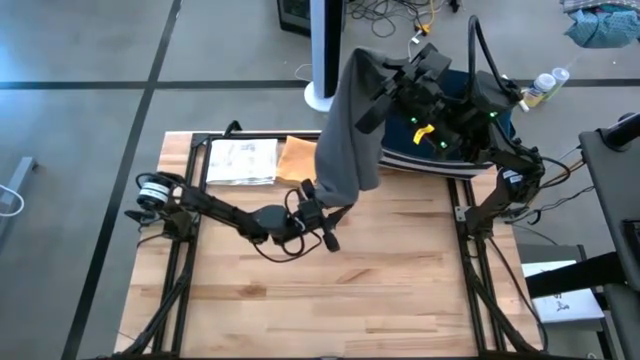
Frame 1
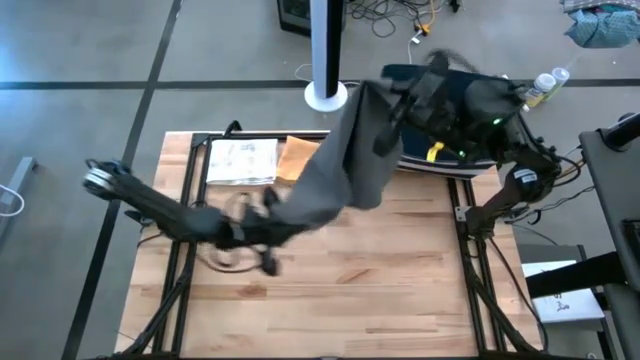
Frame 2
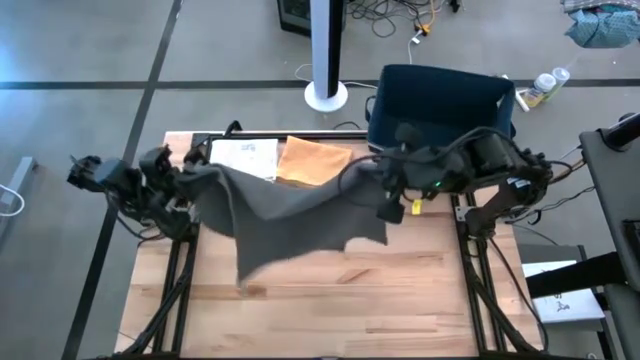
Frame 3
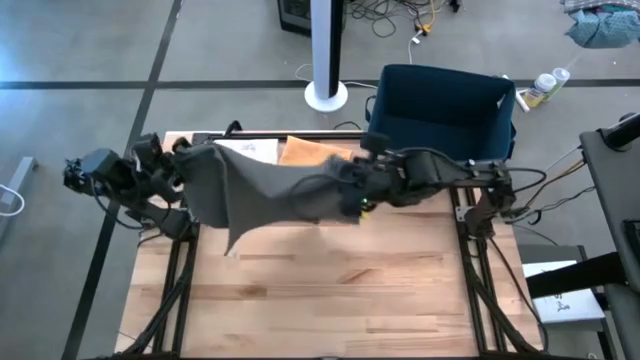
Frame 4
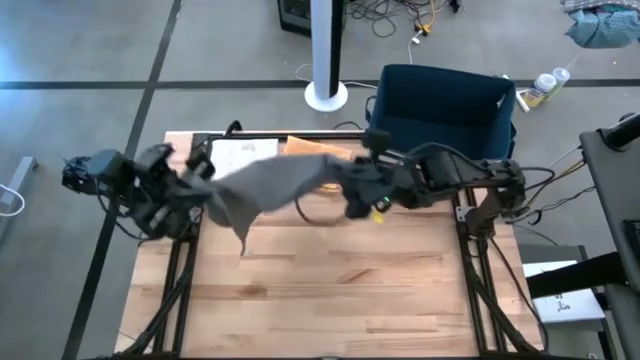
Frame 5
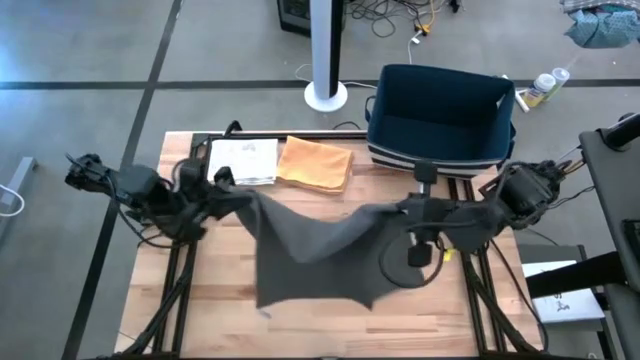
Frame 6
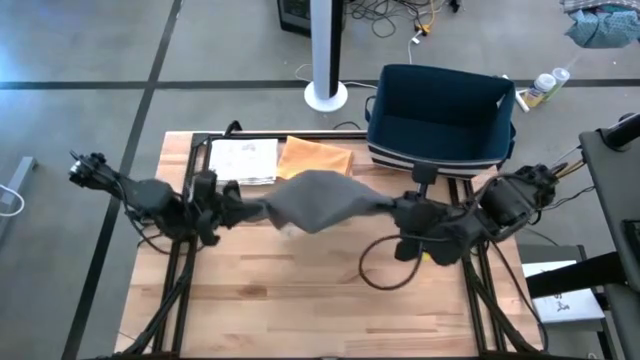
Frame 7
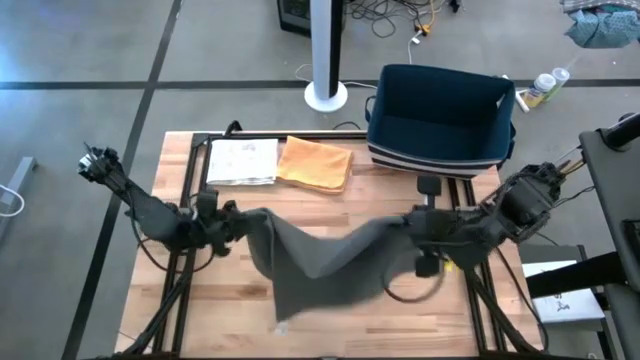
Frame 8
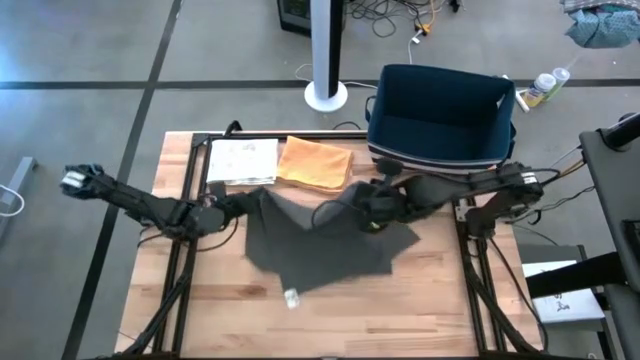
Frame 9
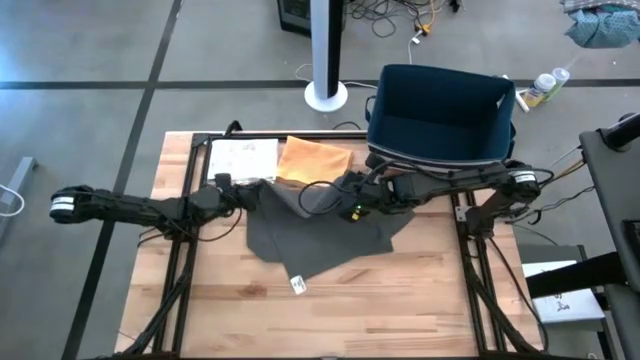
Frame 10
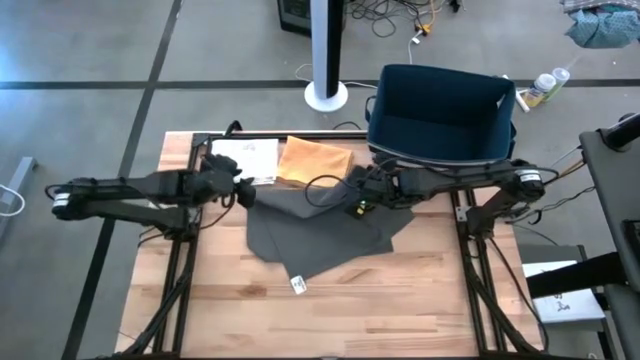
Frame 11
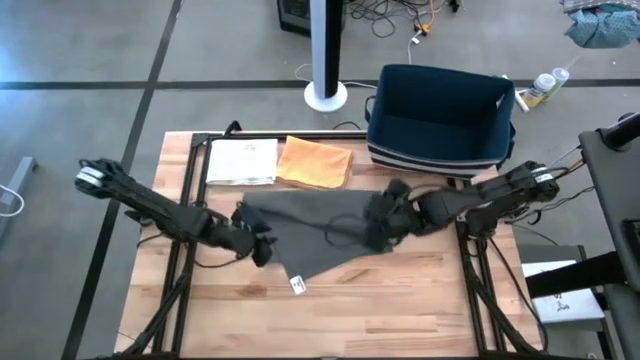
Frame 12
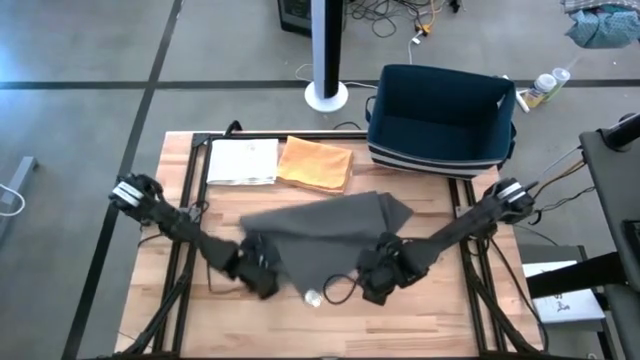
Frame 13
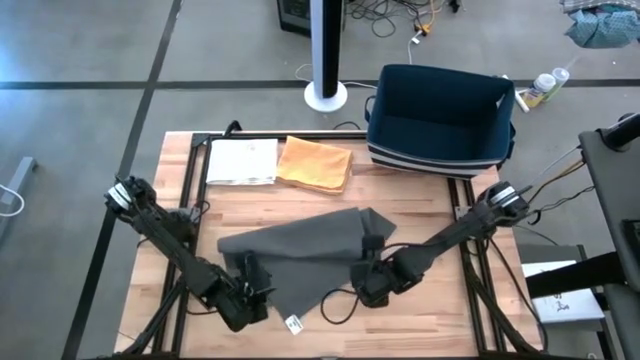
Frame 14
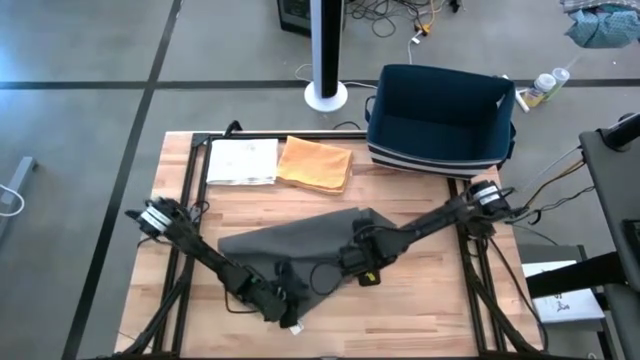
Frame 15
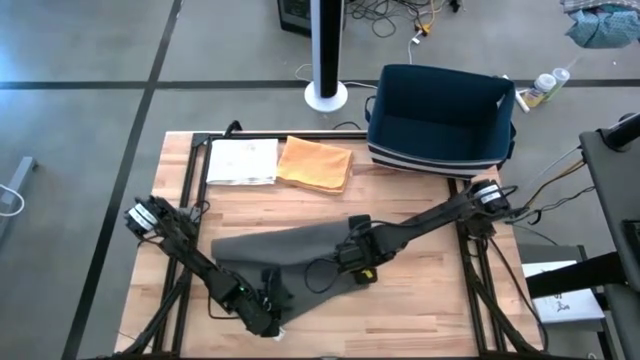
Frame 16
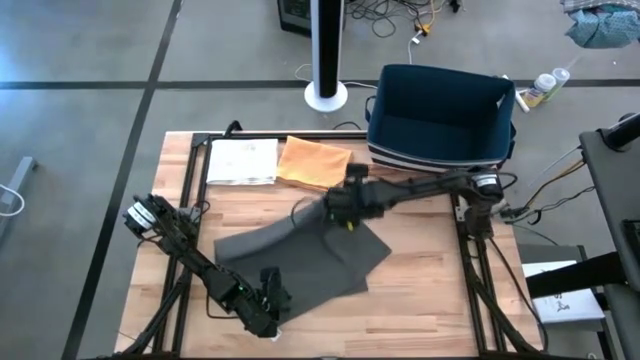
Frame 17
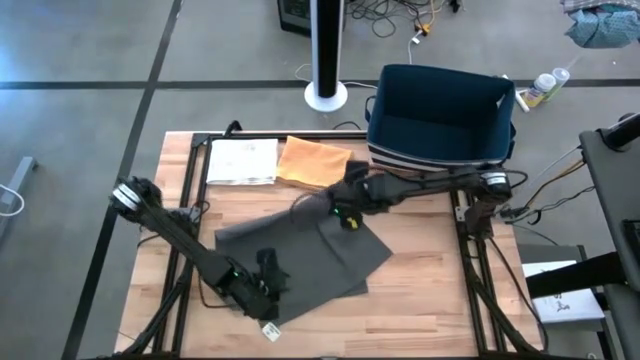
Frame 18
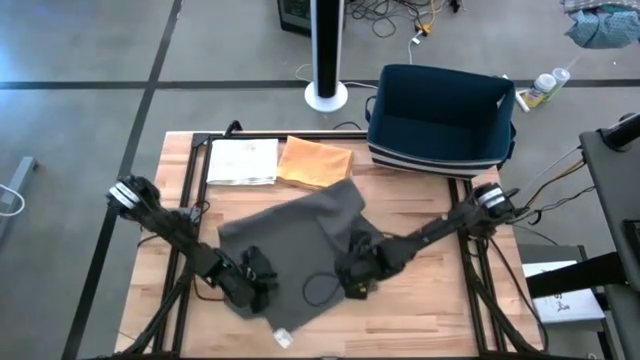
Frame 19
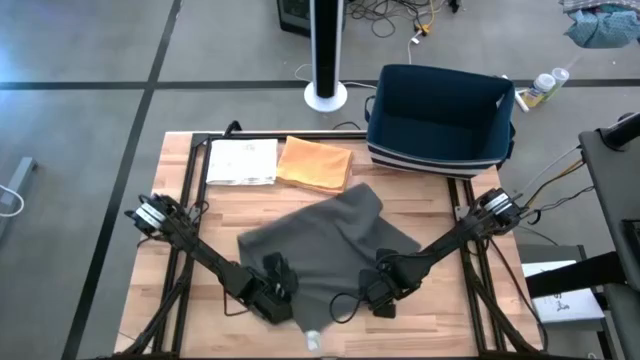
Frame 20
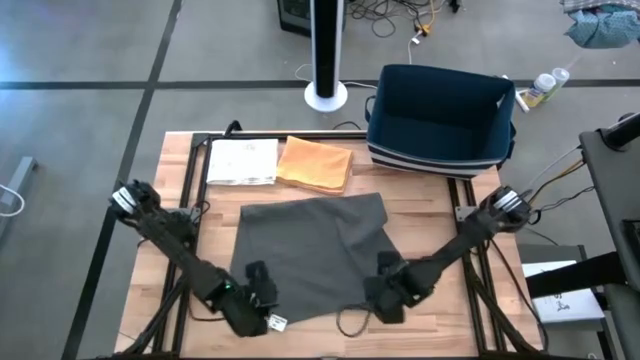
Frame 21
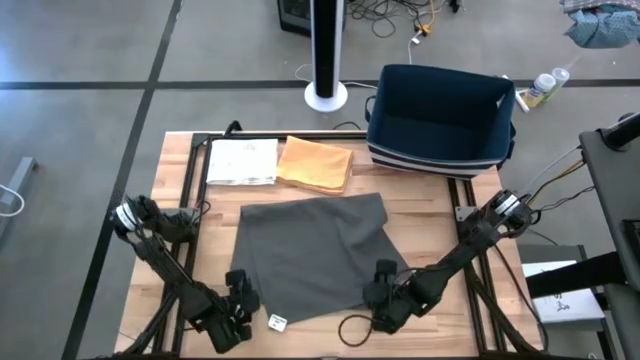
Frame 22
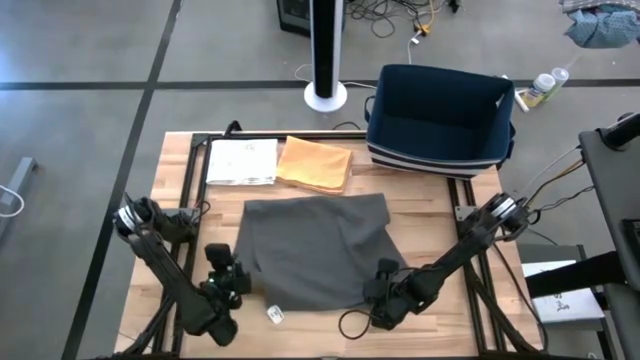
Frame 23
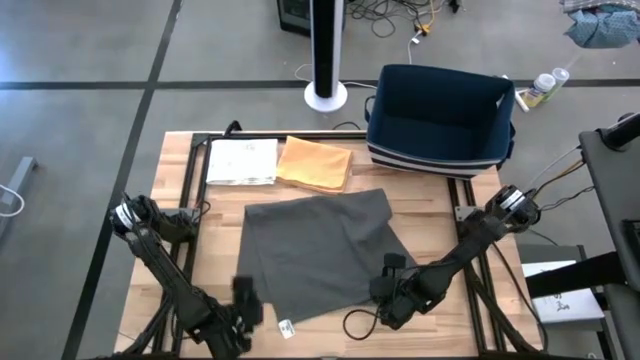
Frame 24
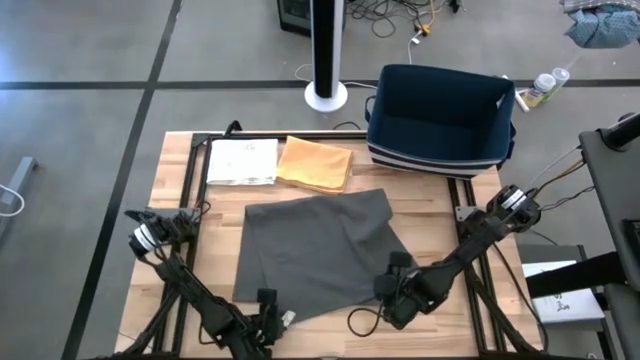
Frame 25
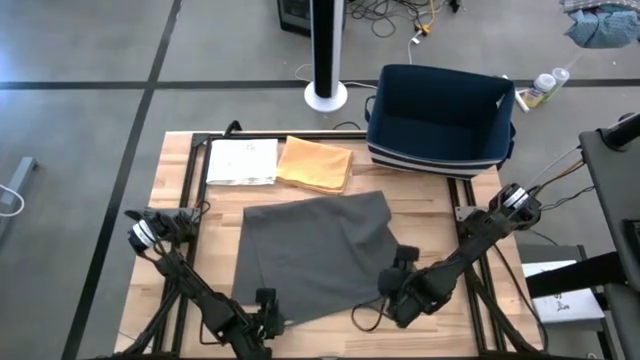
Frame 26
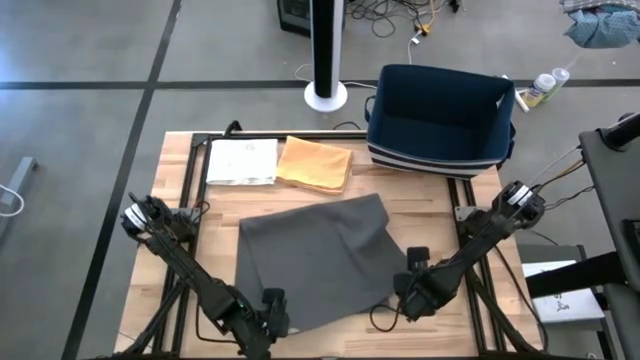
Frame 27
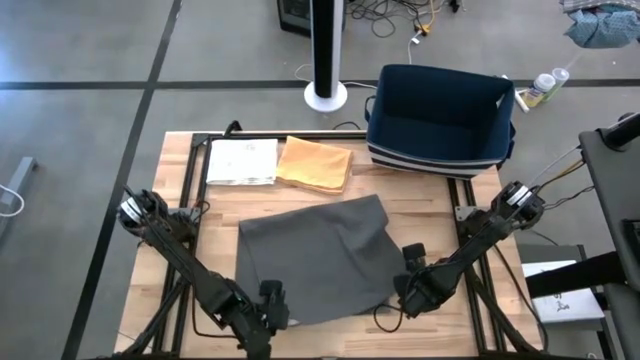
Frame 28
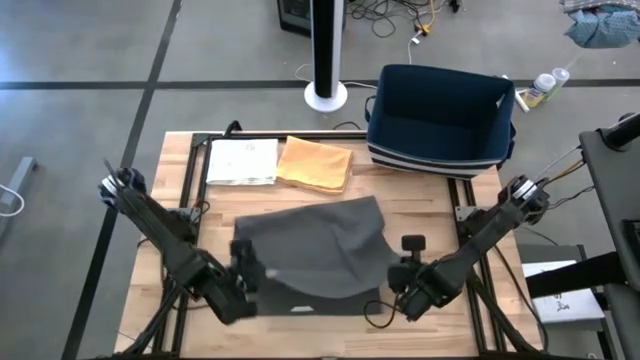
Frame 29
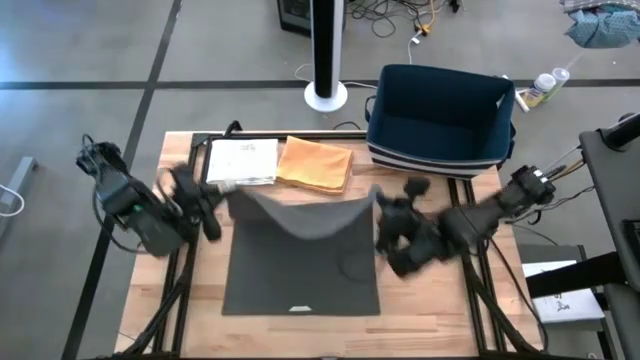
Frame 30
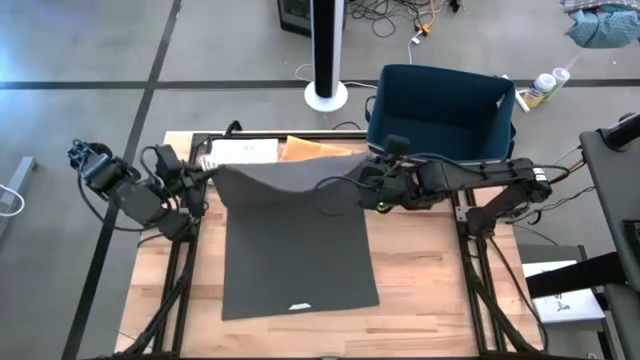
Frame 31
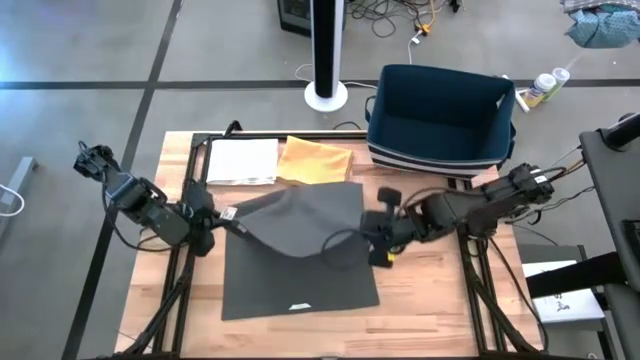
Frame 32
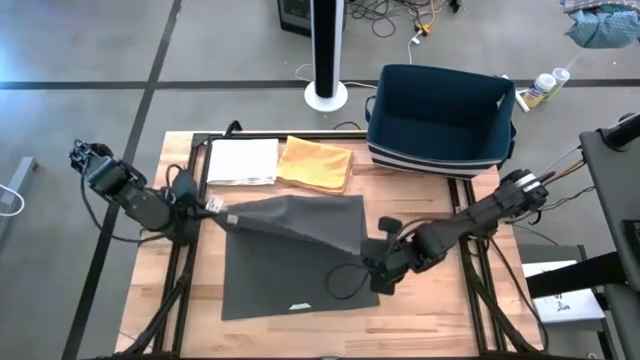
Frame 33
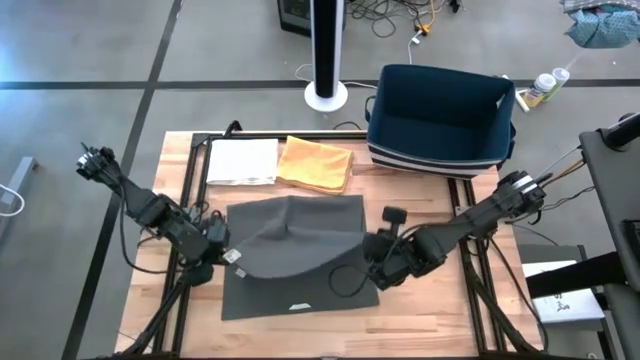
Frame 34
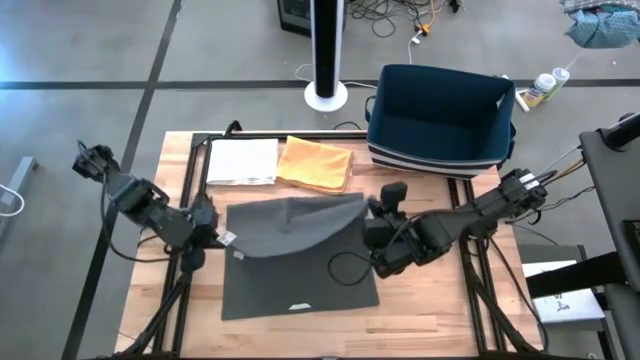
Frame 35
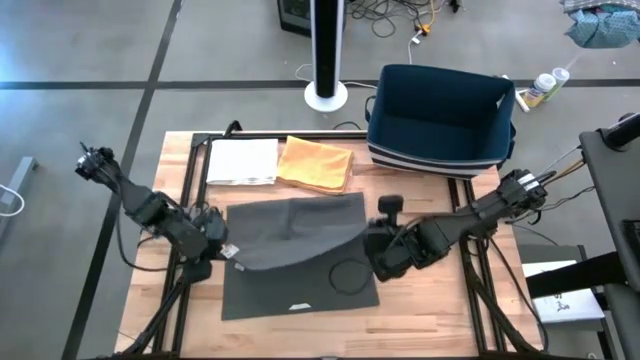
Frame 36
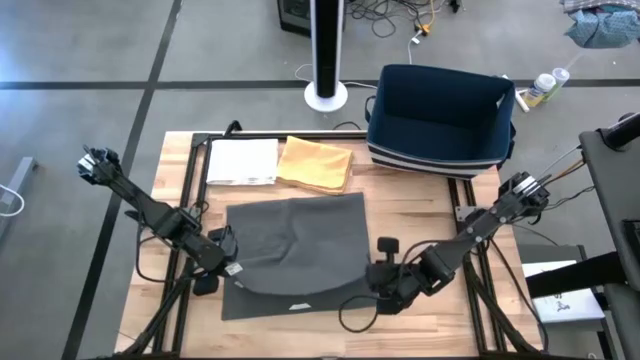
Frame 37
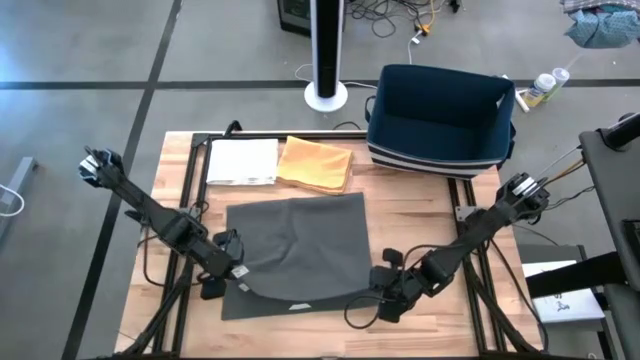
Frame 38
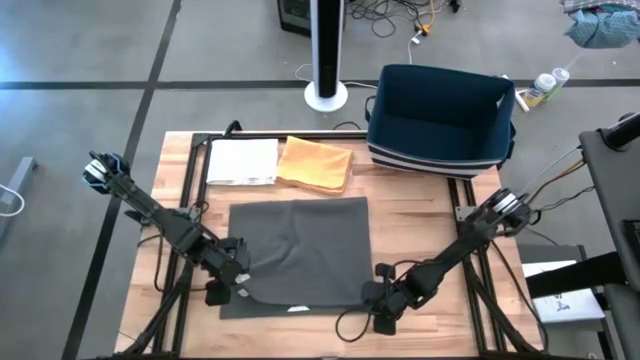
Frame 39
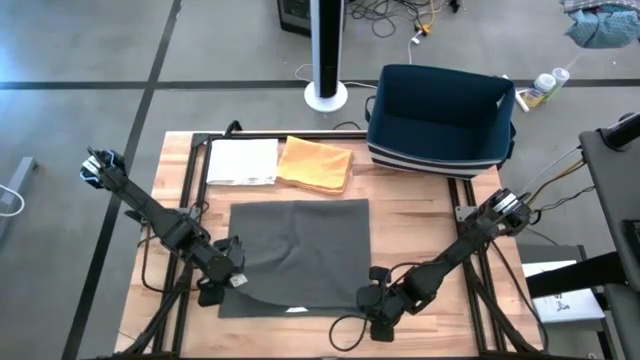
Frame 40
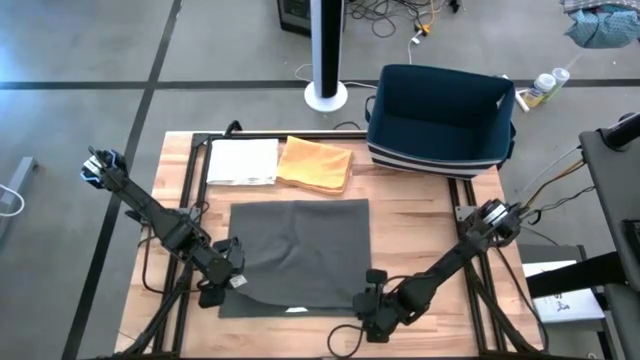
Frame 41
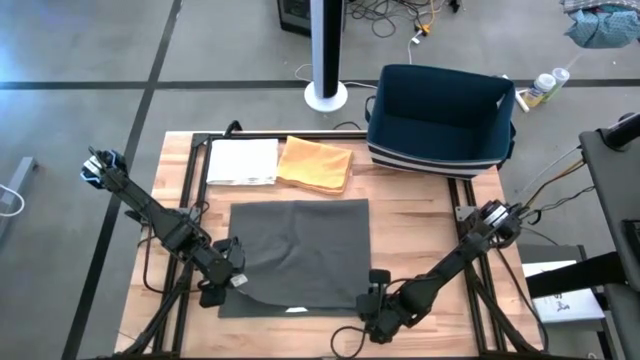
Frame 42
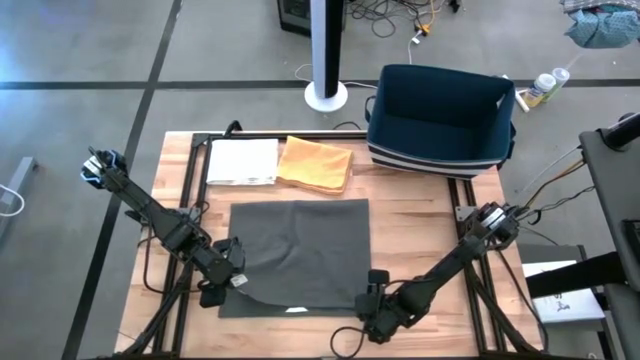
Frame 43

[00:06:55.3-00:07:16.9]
Task: Fold towel
Fold the black towel
